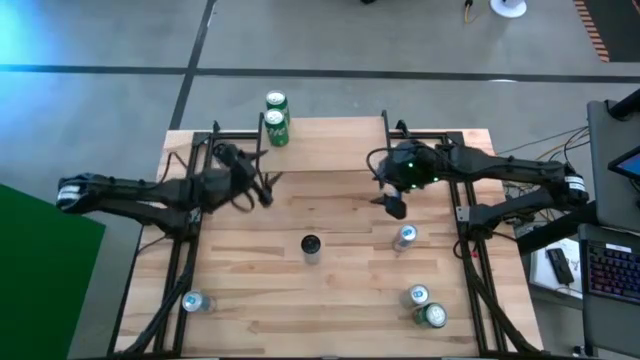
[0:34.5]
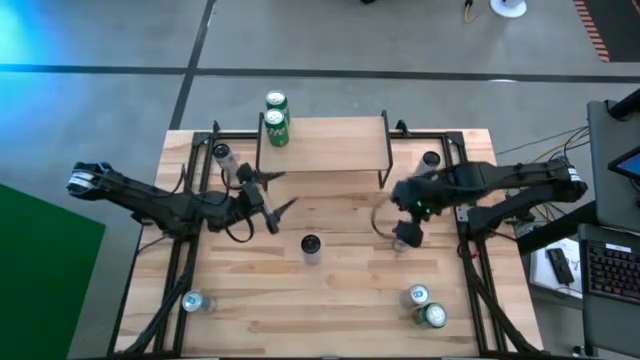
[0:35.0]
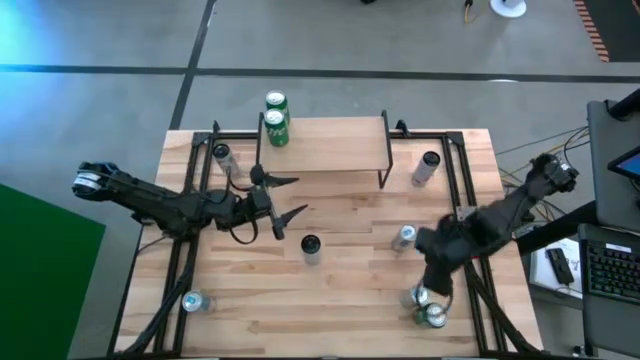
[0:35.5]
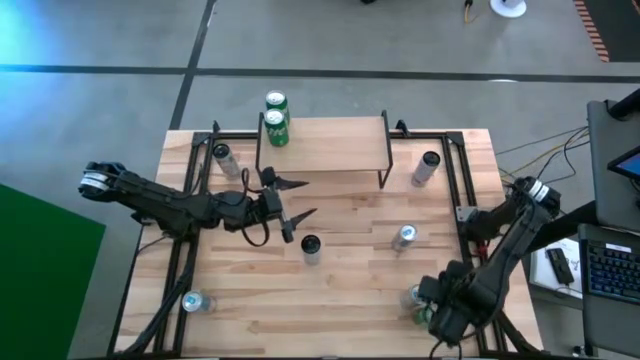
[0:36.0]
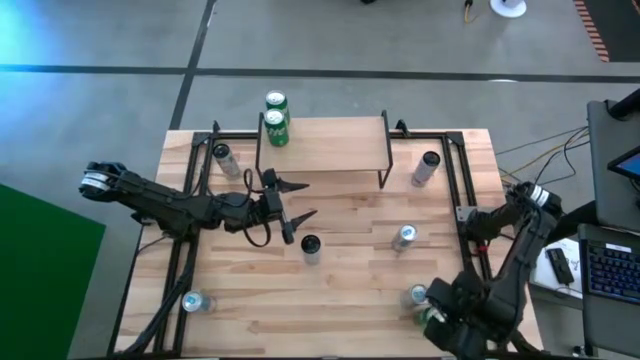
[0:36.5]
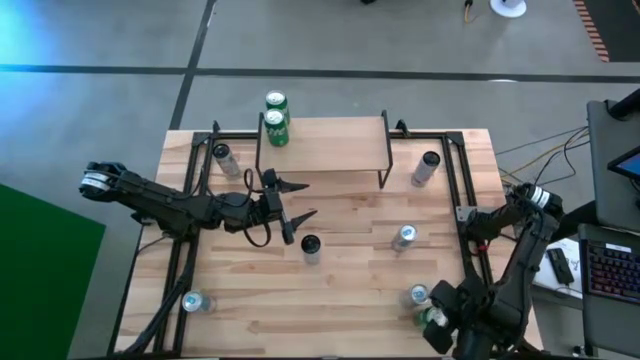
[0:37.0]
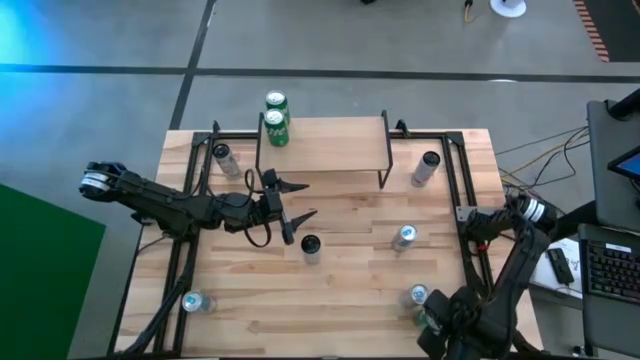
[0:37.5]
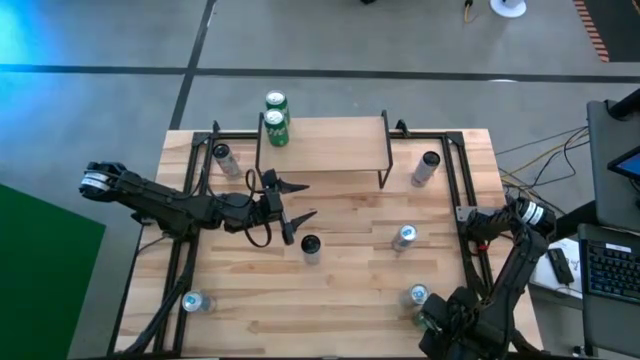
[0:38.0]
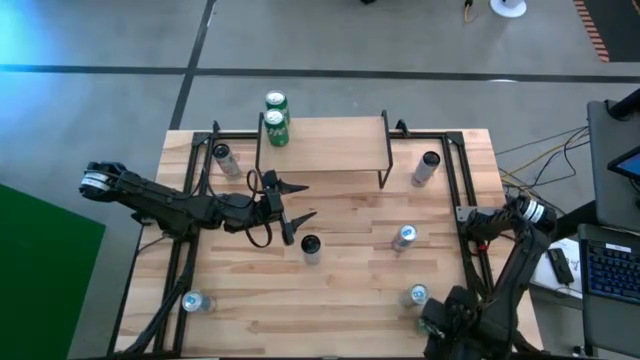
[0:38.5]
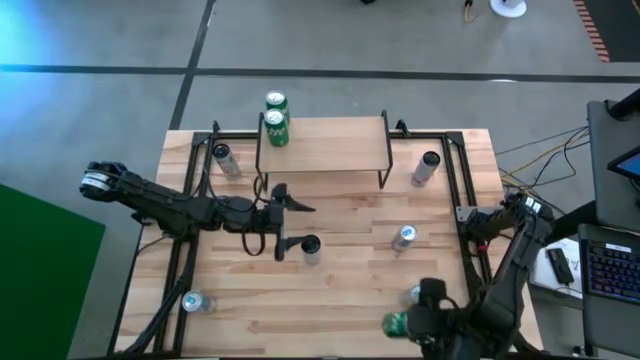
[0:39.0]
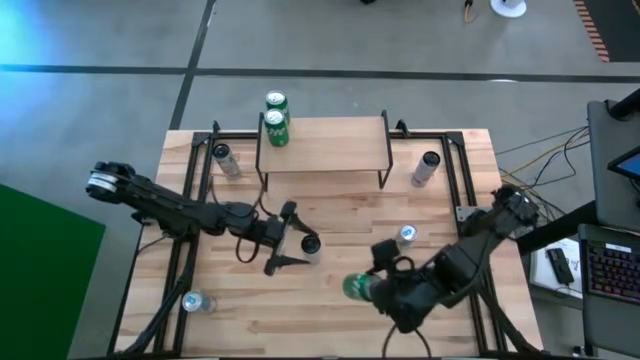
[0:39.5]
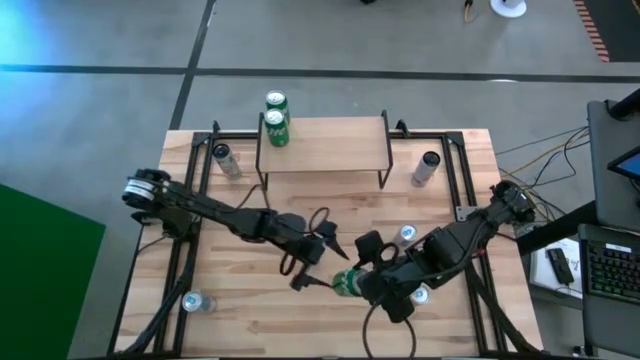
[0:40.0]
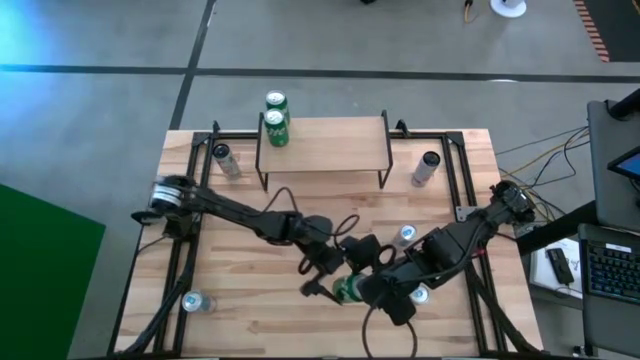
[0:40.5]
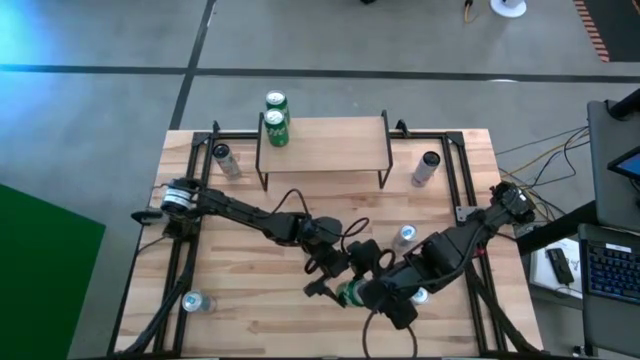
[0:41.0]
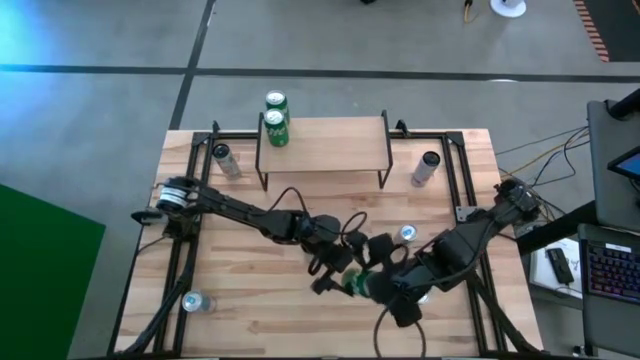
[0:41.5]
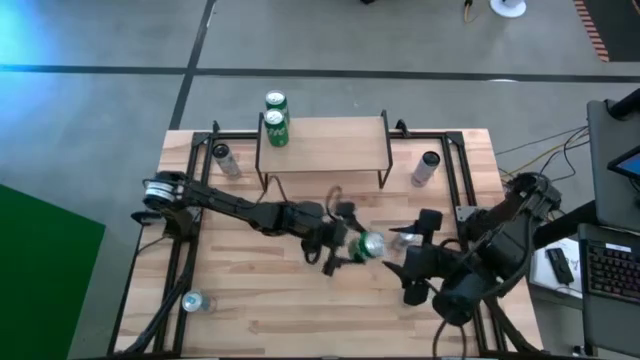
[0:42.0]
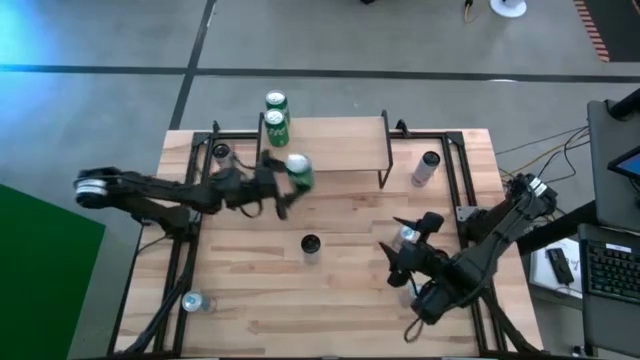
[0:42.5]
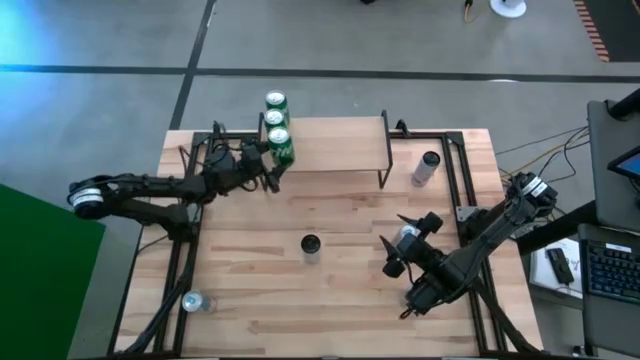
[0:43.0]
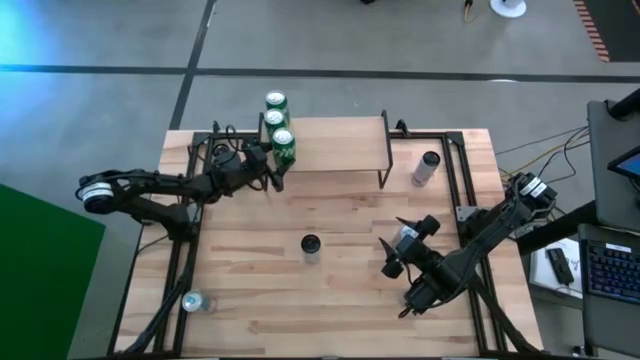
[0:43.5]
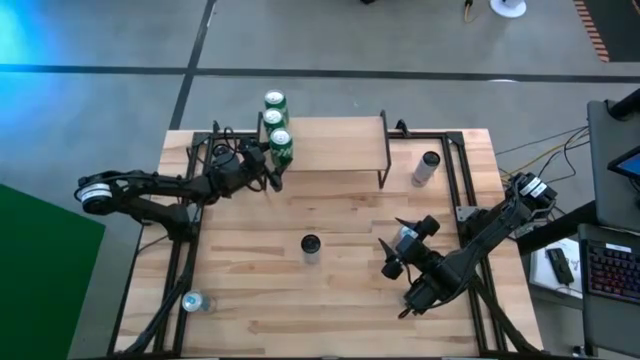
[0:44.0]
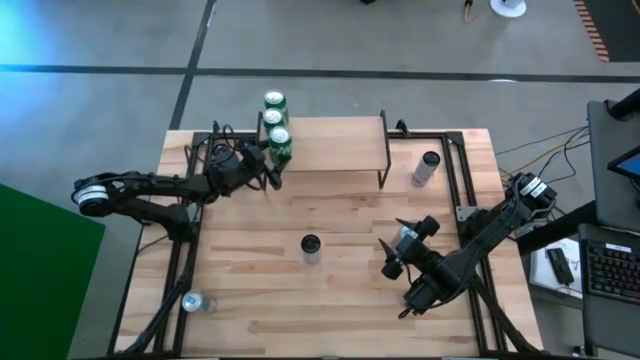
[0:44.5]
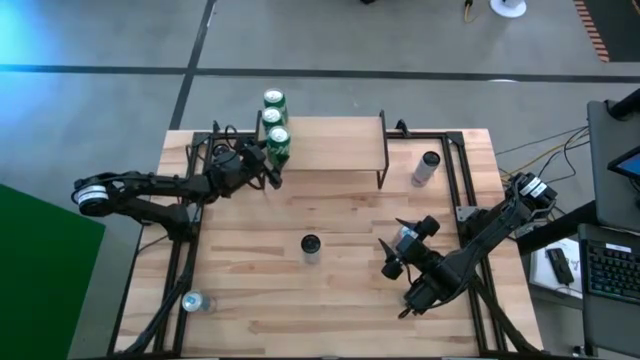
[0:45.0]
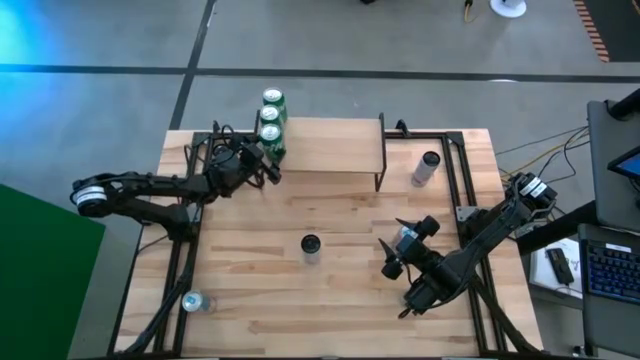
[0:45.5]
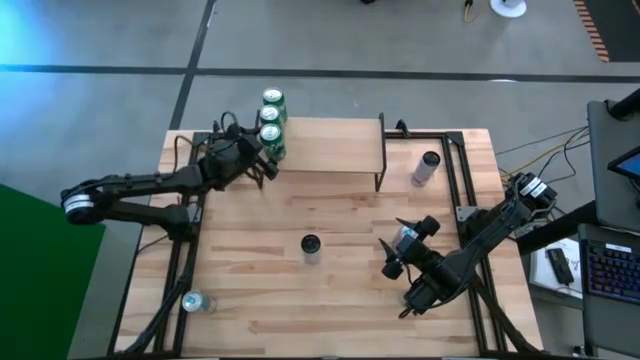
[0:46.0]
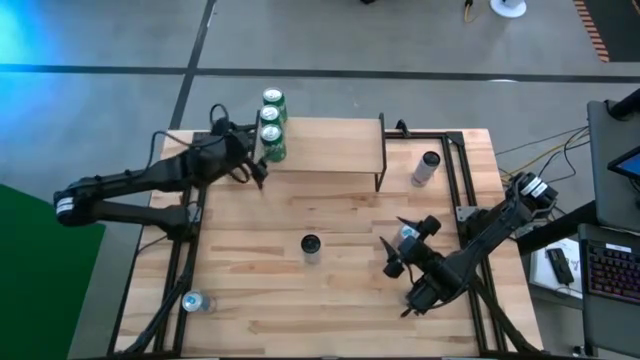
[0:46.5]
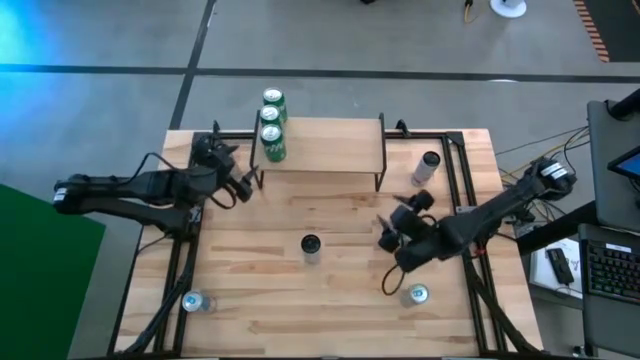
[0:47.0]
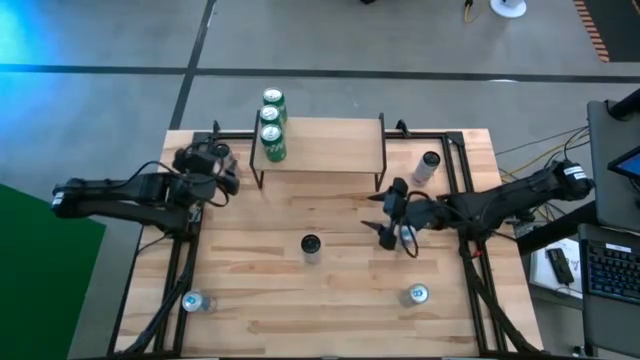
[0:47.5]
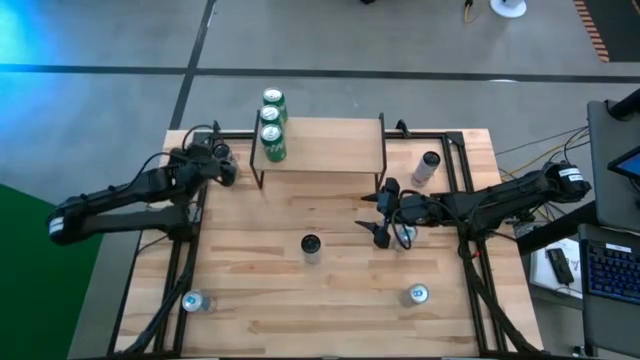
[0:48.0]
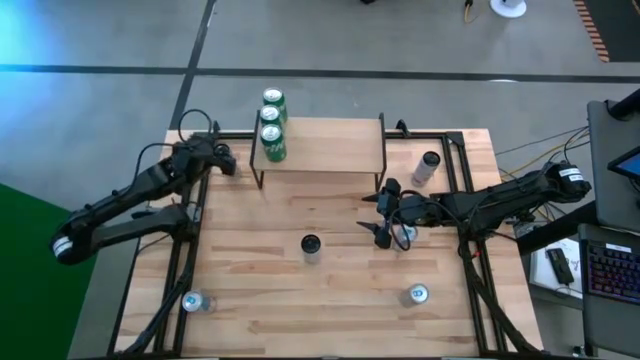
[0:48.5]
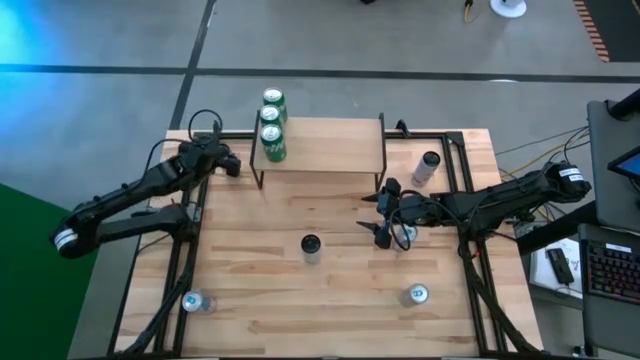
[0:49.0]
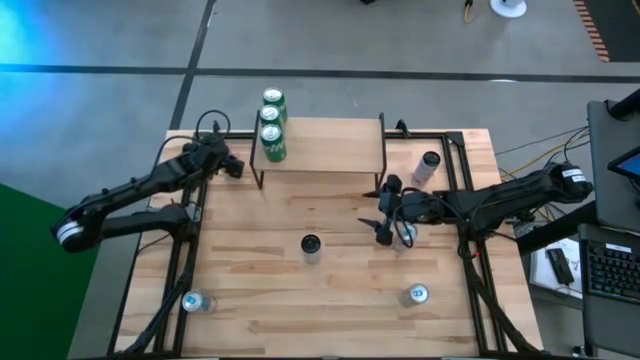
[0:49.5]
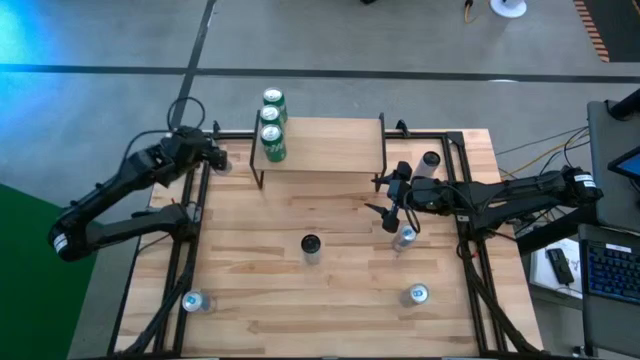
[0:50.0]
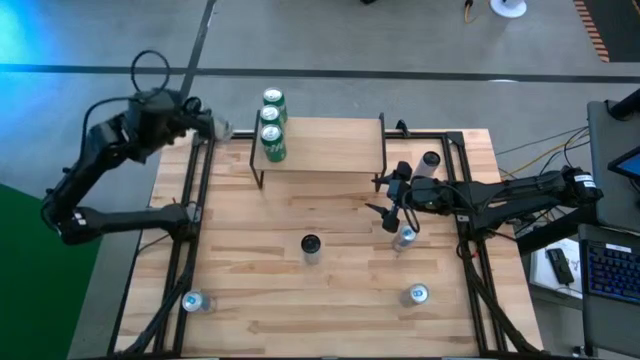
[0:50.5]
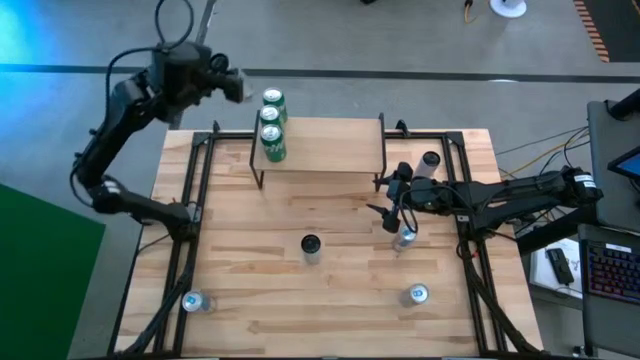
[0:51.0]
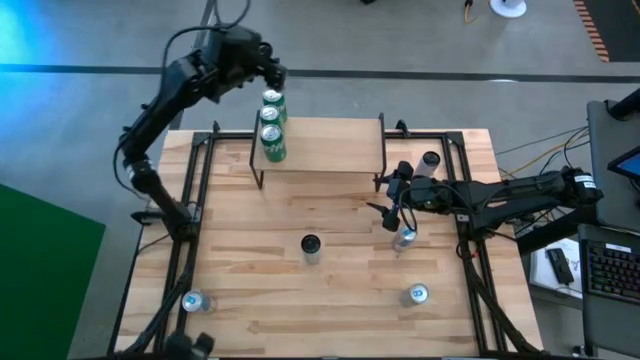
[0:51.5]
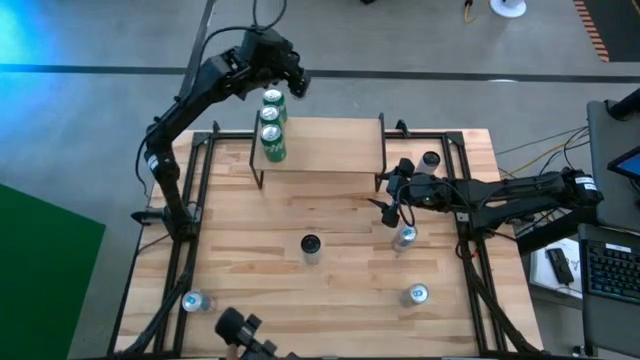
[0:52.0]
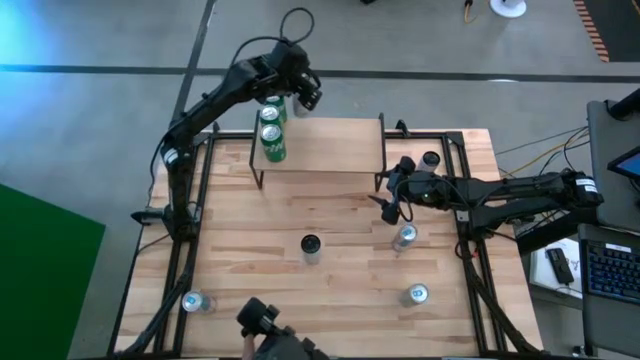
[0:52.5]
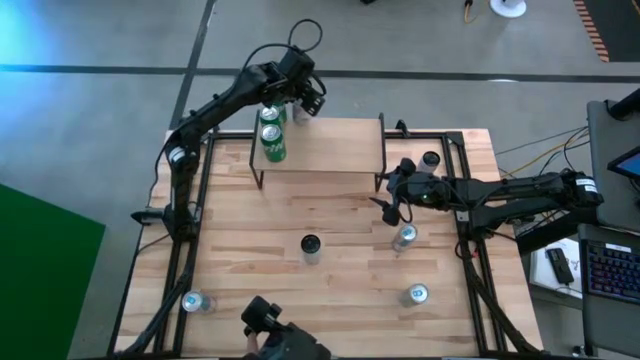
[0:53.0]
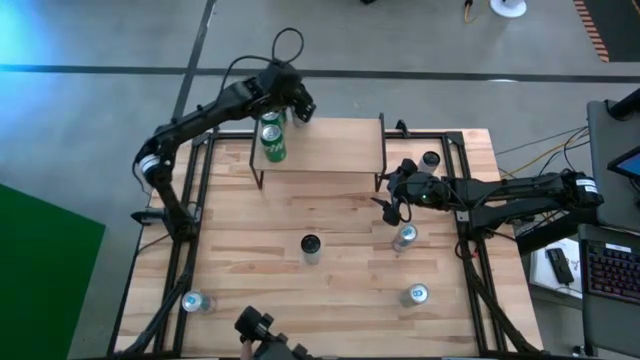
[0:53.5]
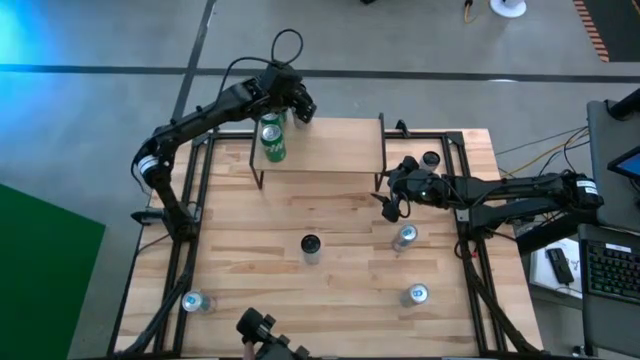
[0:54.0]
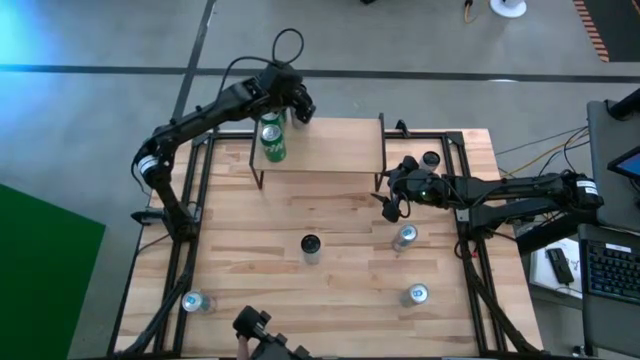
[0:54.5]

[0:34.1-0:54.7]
Task: Place canned beverage on shelf
Put the top left white soda can on the shelf
